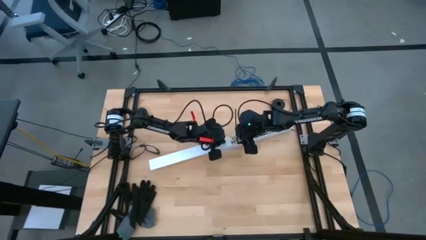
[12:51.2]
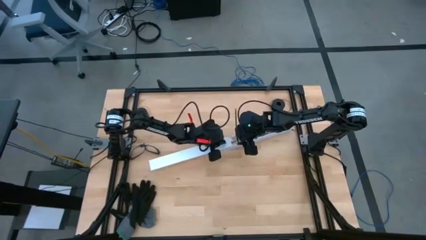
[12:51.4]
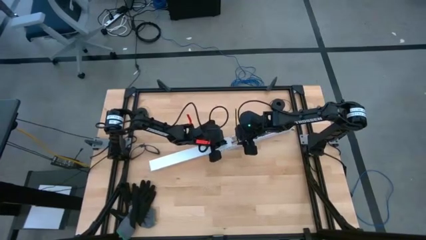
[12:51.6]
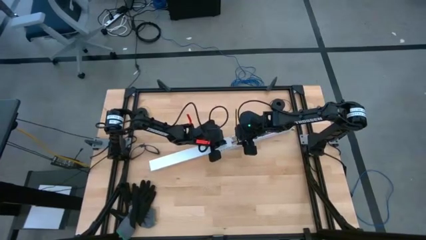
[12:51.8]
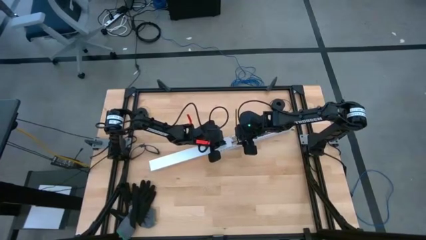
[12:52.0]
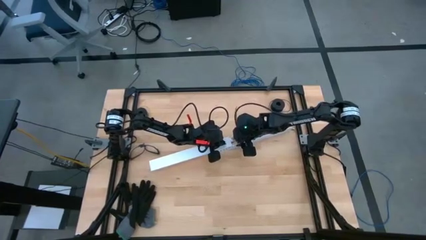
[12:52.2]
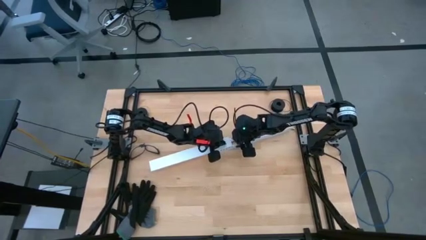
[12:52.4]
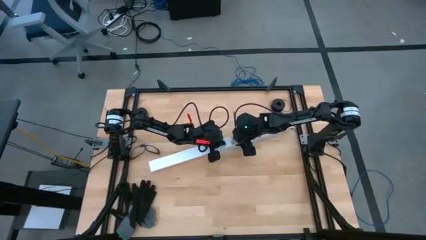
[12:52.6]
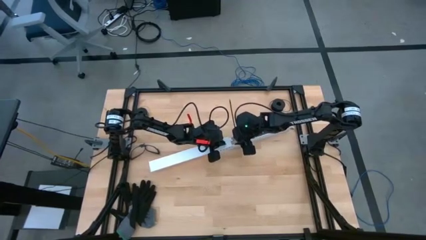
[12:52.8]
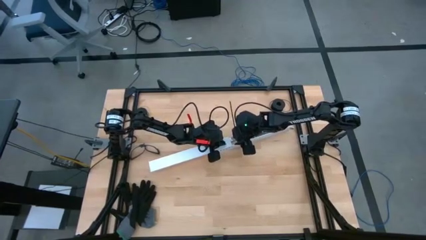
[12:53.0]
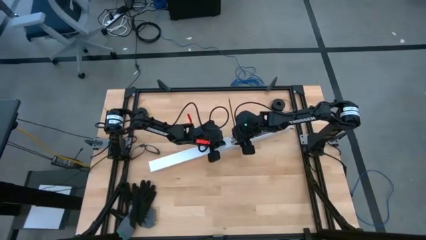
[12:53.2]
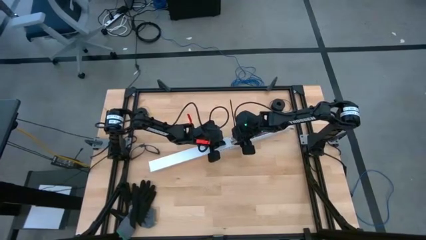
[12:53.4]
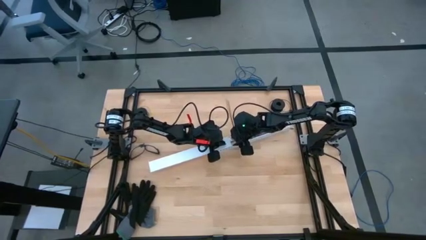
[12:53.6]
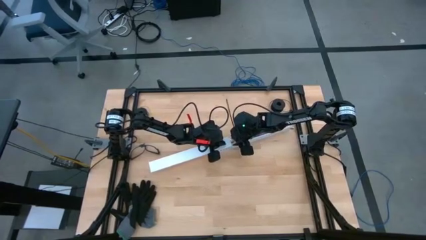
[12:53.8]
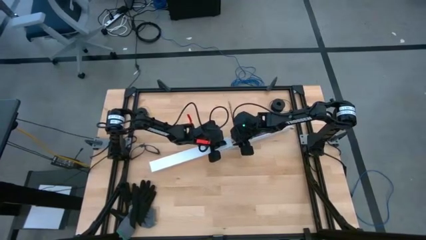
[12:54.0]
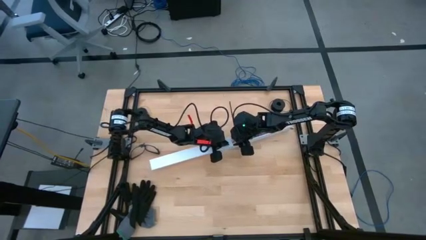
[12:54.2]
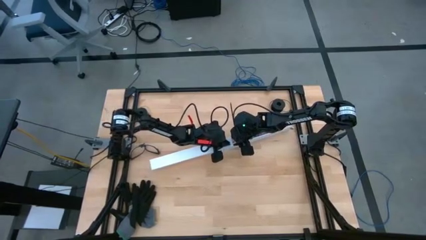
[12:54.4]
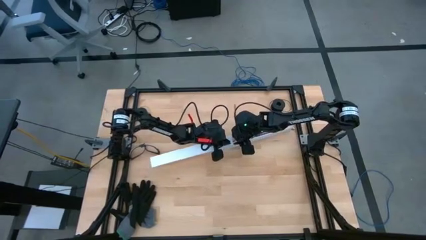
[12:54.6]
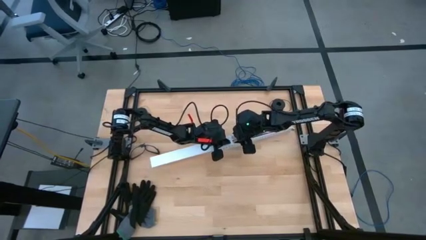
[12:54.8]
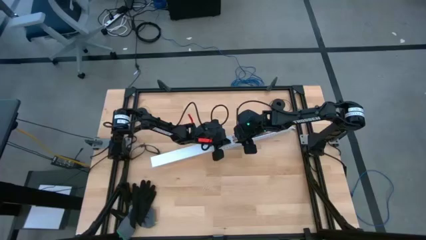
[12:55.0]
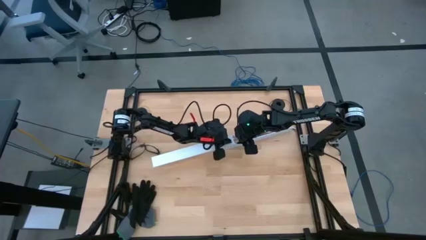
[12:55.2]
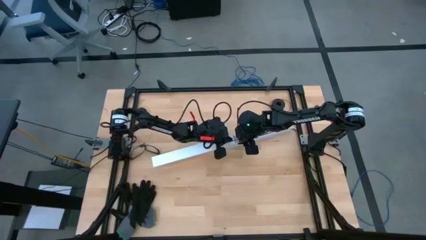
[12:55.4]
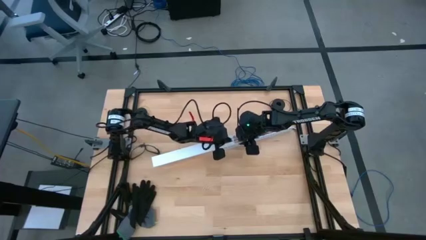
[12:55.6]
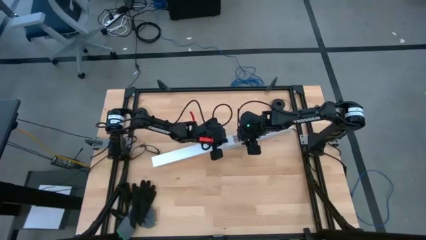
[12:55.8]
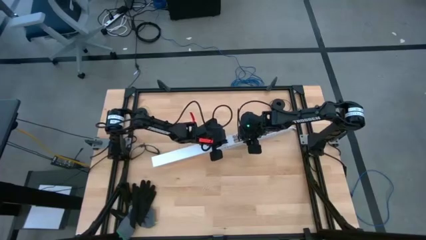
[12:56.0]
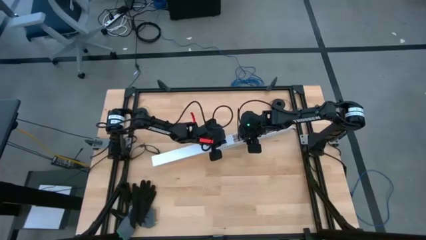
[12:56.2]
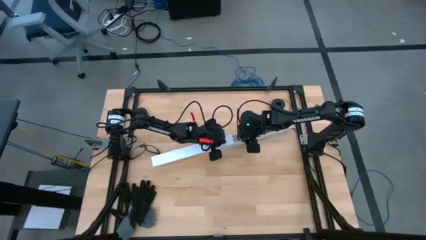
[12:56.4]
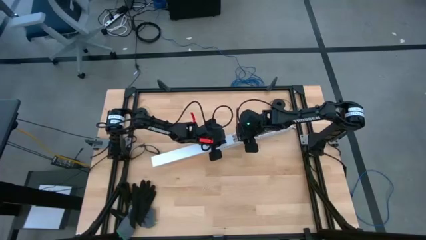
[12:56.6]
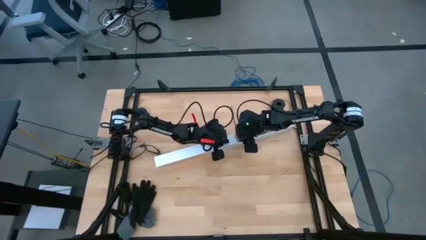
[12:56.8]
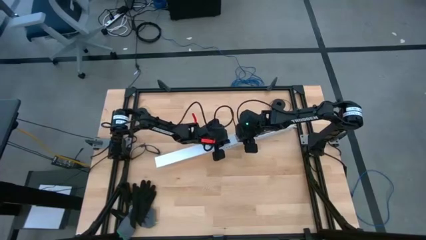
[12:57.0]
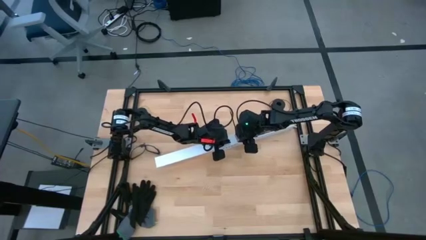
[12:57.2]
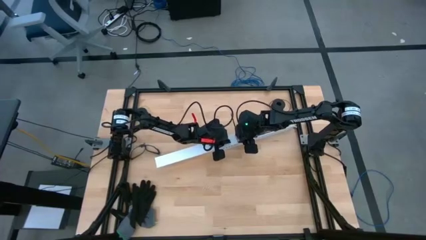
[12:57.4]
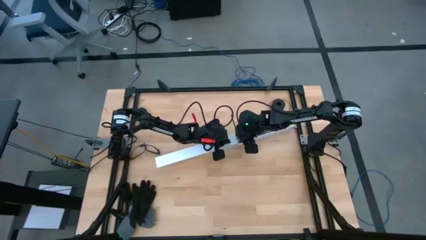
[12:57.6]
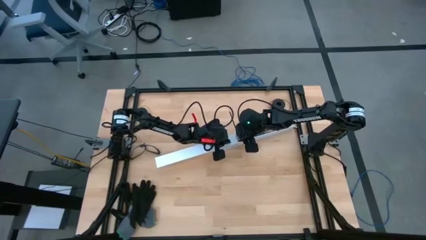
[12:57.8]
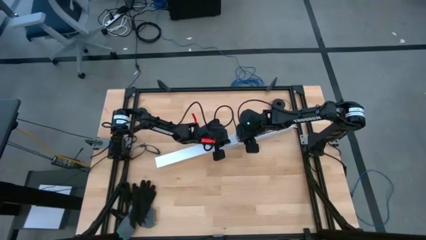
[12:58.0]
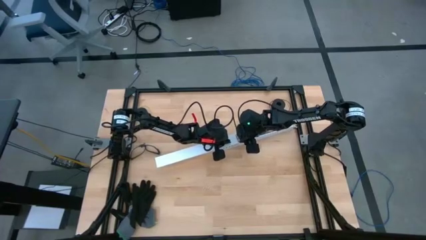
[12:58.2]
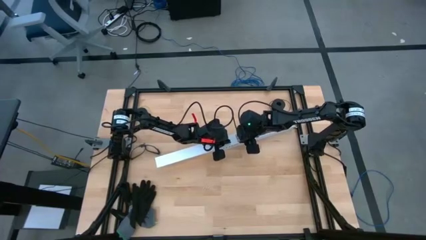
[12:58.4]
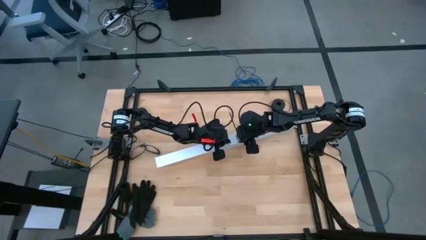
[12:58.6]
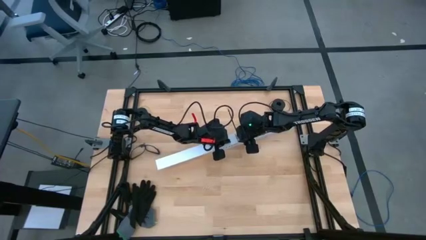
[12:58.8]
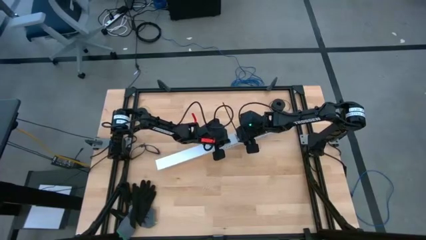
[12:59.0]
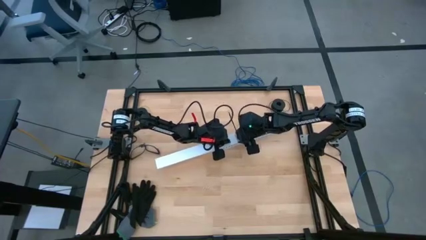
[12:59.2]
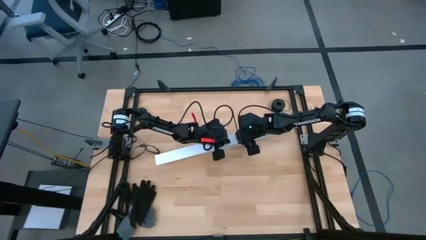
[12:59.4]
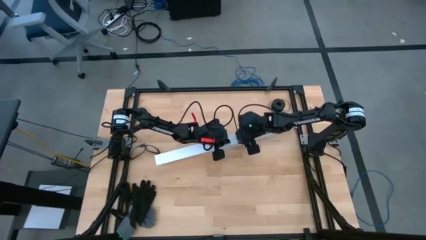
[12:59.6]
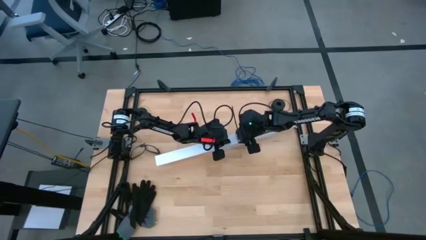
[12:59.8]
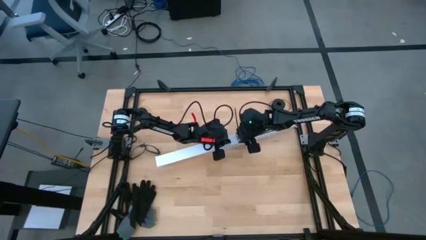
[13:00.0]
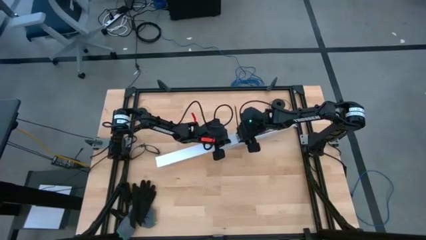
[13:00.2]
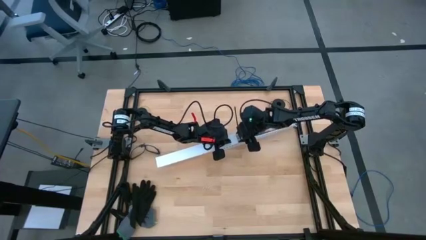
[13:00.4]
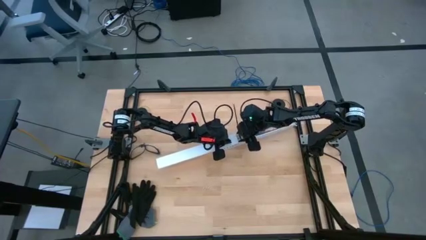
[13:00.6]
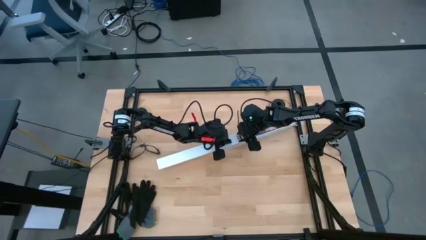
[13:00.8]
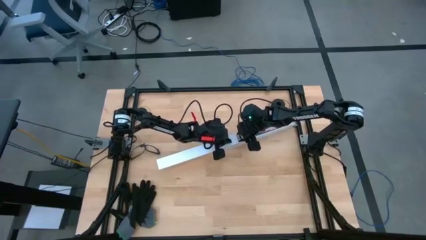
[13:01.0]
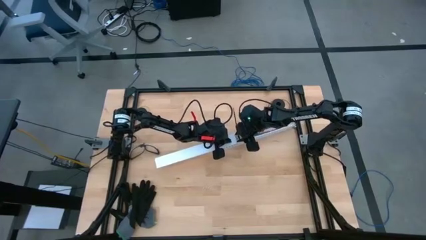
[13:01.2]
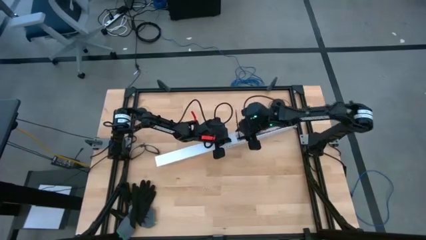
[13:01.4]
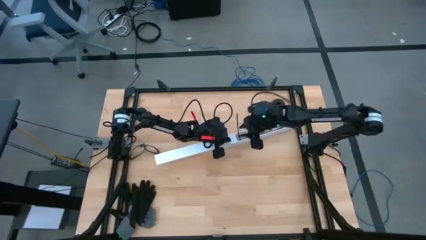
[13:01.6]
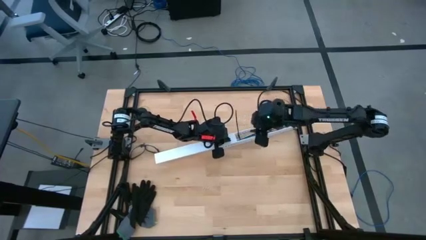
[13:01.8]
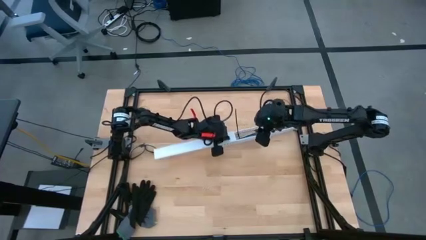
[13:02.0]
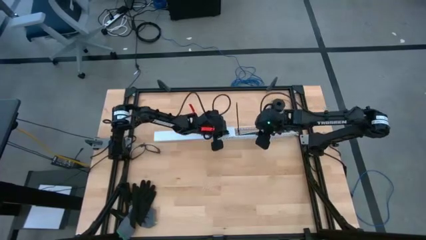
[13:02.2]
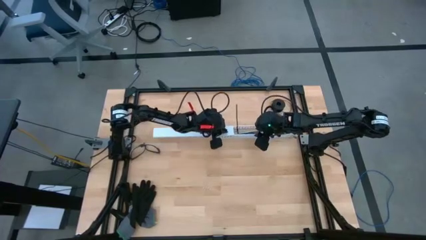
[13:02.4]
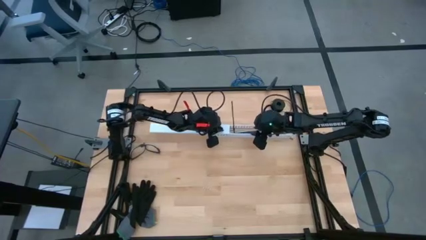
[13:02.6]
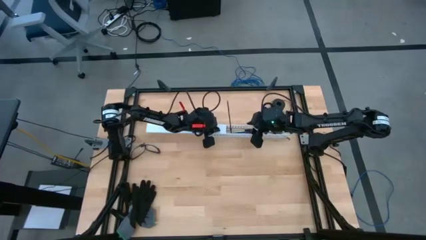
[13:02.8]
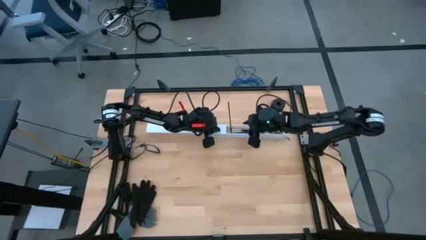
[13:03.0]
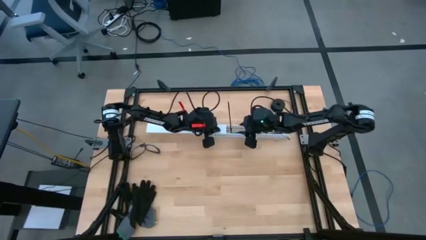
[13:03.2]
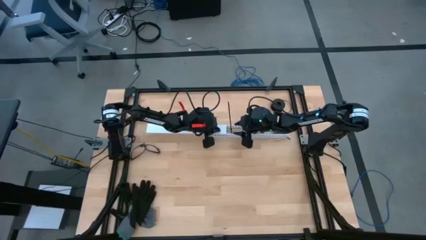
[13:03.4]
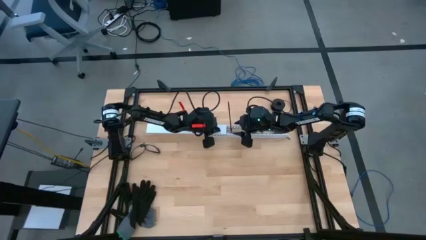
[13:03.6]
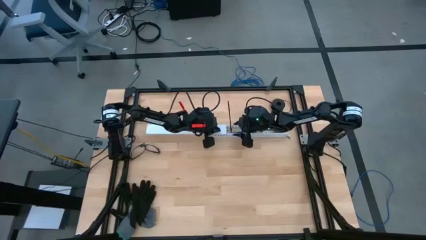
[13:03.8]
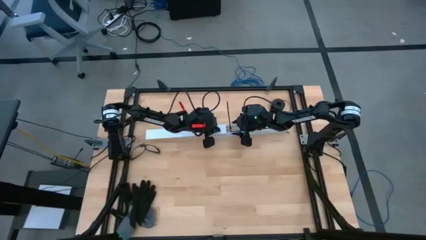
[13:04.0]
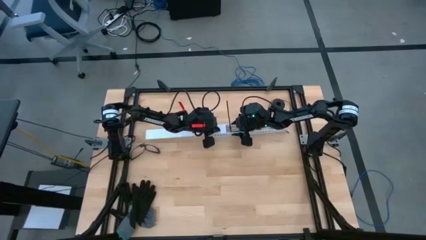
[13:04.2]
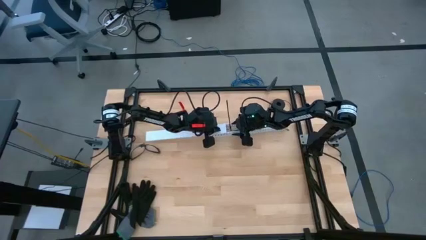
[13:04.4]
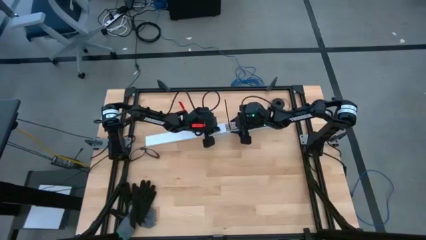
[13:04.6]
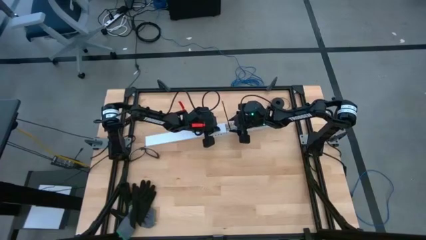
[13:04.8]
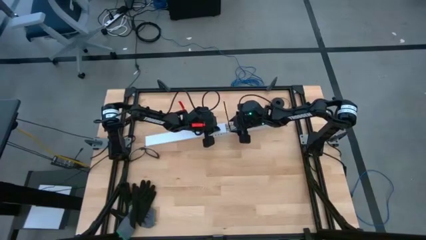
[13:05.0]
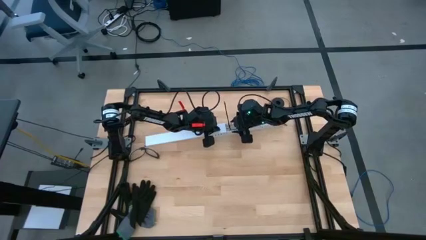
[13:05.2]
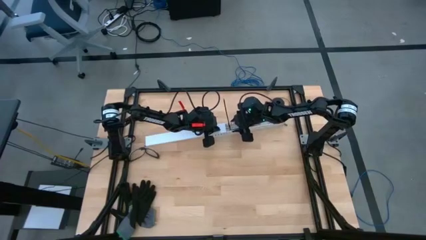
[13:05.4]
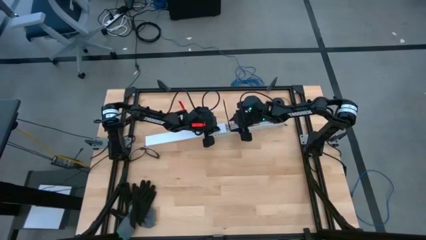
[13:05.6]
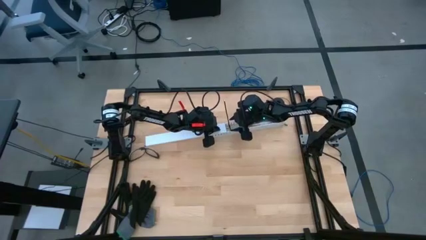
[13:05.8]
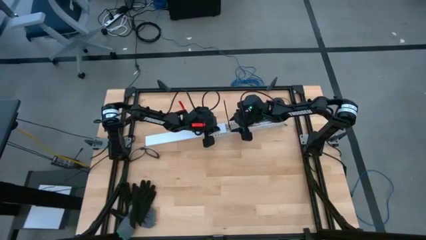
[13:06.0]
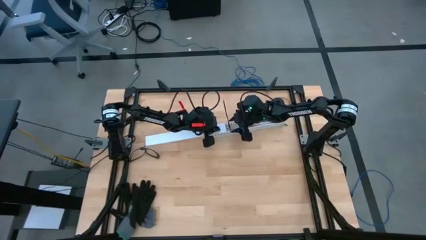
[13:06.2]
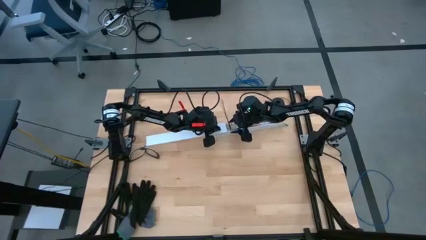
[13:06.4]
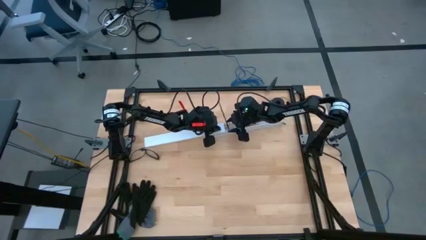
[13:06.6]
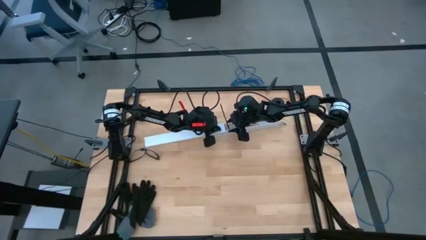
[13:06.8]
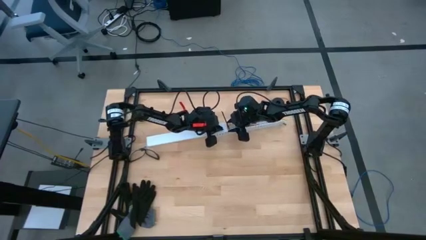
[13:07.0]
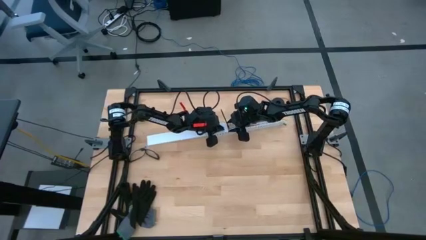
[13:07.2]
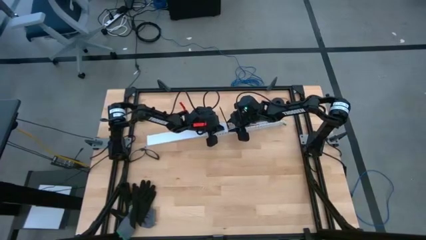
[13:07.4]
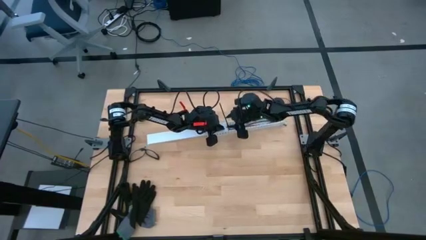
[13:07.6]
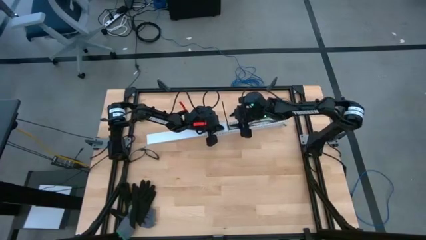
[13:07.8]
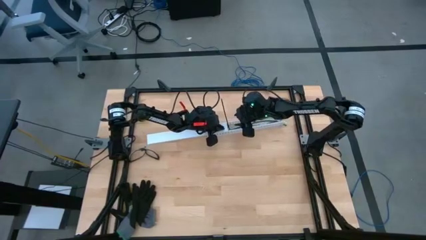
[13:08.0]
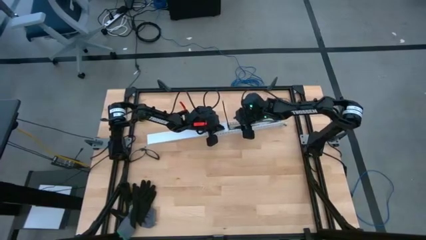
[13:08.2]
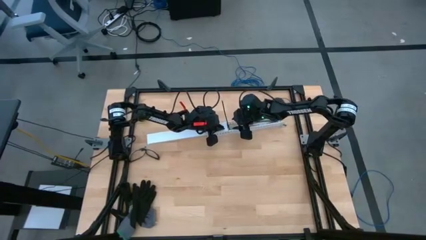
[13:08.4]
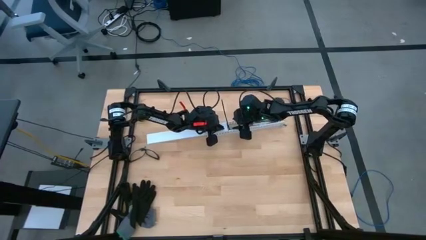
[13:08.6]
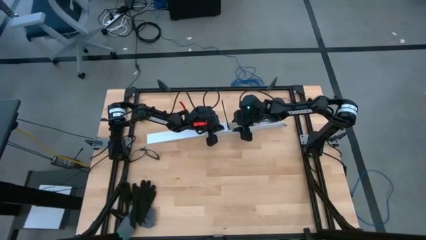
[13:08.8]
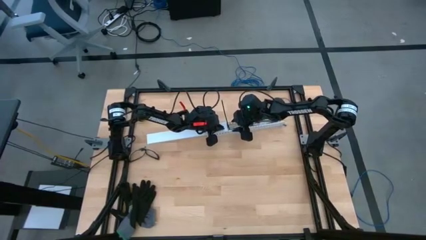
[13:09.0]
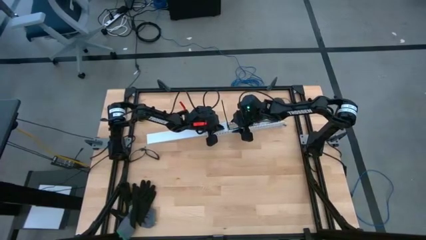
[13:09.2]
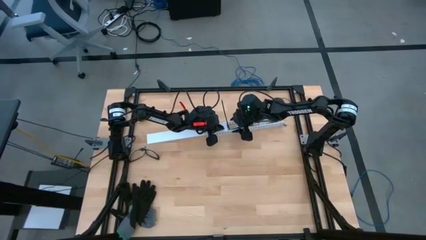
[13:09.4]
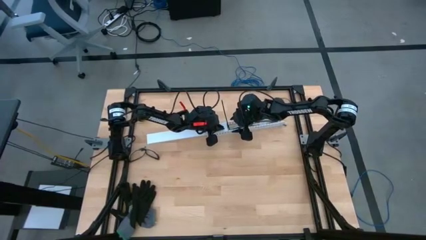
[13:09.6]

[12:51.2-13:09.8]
Task: Ziptie cables
Close the white cable duct
